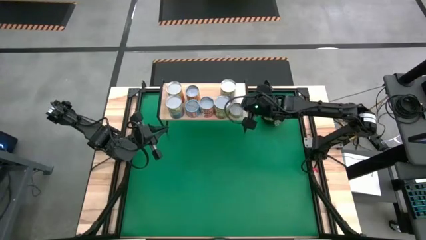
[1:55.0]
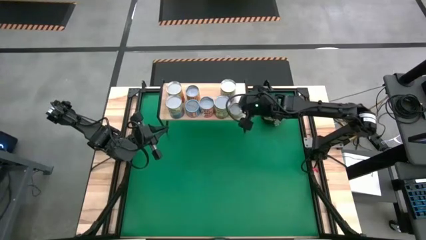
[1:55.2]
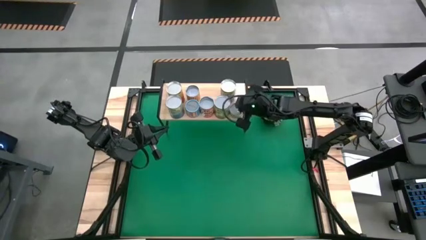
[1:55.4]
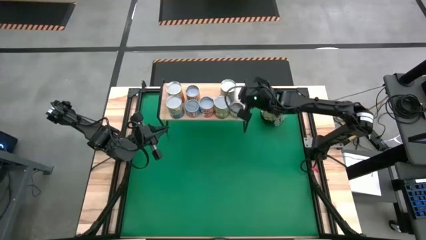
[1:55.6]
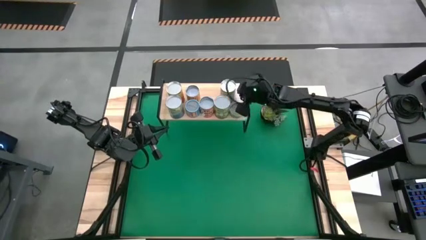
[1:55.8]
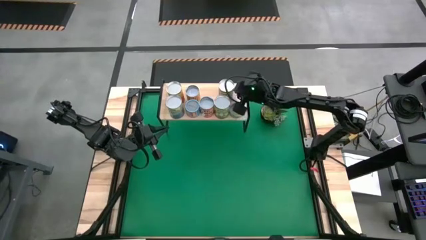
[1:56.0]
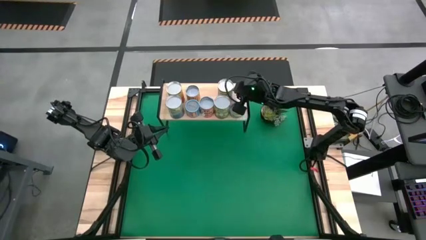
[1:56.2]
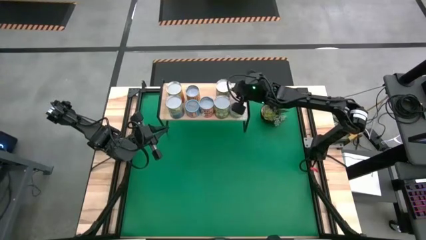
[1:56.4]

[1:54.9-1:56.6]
Task: Pick and place cans onto a shelf
Adjust the light blue can on the shelf

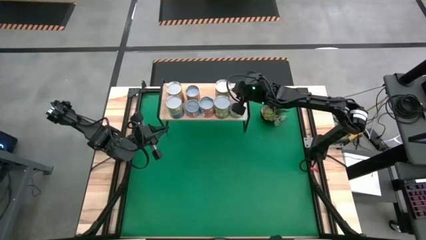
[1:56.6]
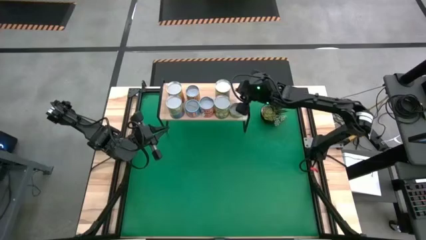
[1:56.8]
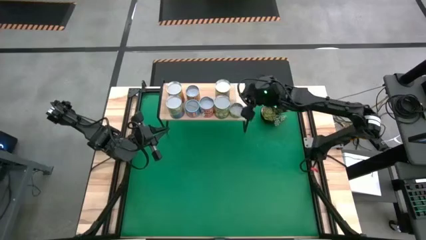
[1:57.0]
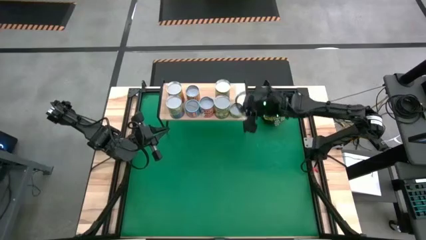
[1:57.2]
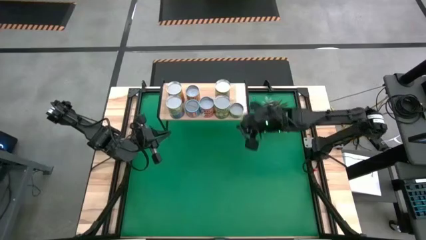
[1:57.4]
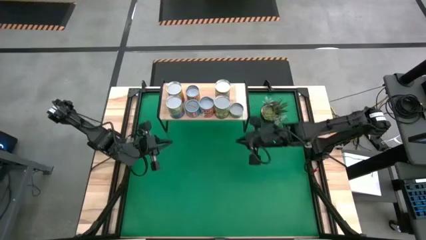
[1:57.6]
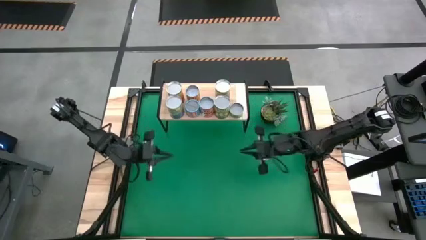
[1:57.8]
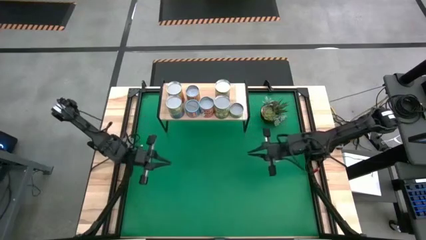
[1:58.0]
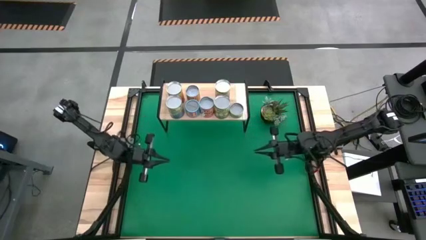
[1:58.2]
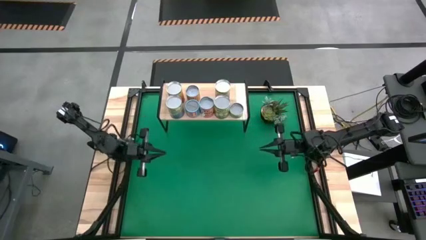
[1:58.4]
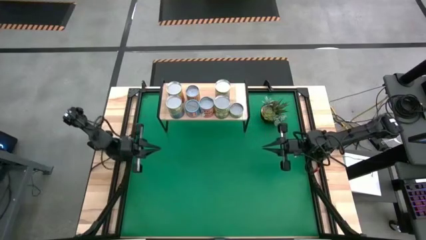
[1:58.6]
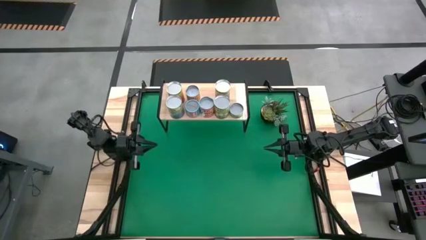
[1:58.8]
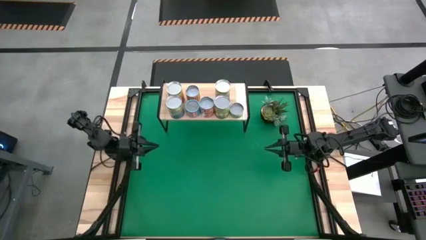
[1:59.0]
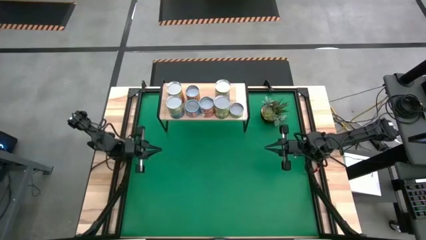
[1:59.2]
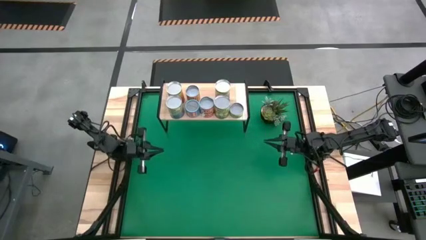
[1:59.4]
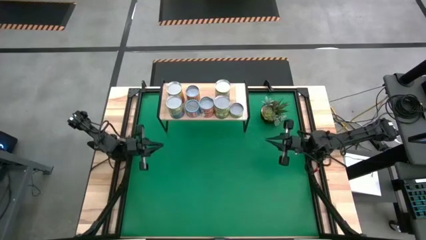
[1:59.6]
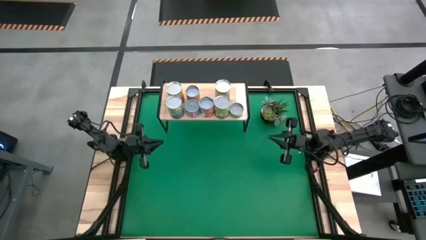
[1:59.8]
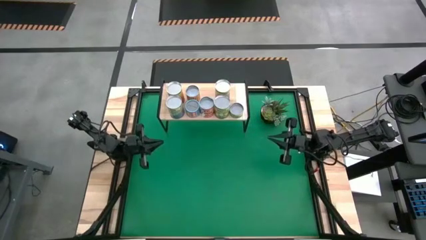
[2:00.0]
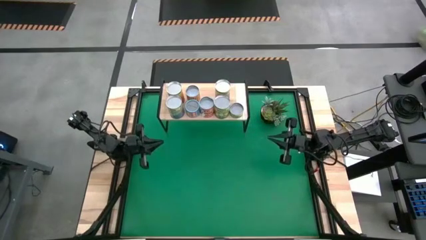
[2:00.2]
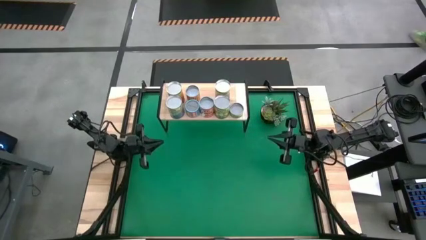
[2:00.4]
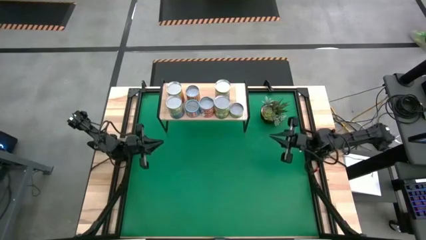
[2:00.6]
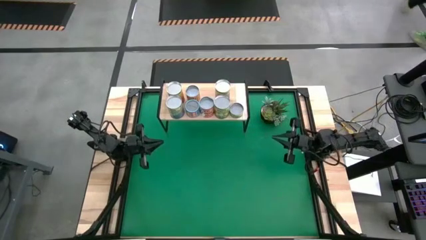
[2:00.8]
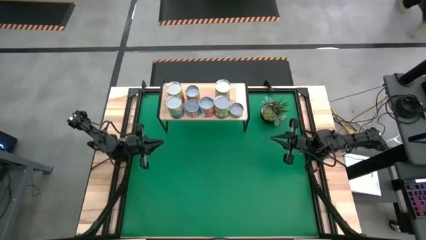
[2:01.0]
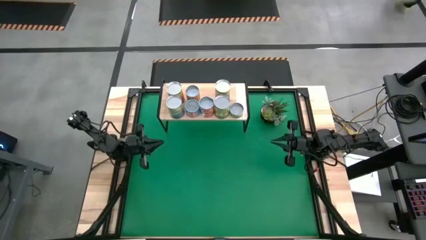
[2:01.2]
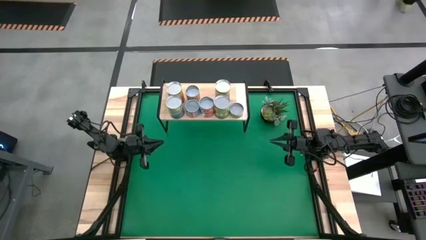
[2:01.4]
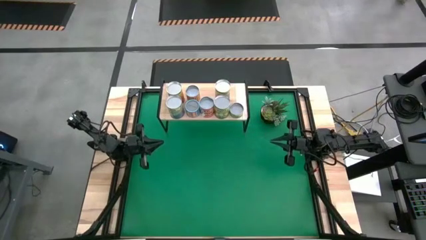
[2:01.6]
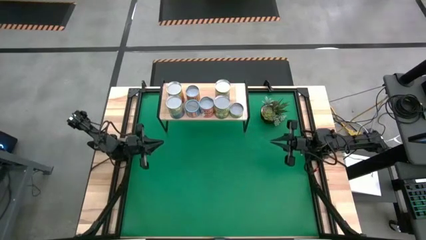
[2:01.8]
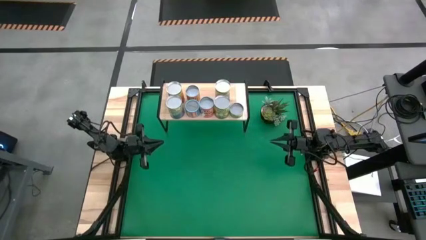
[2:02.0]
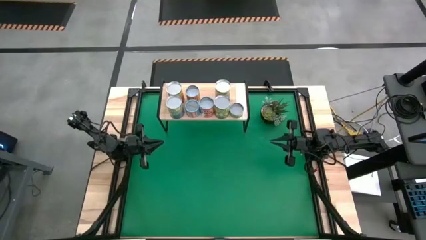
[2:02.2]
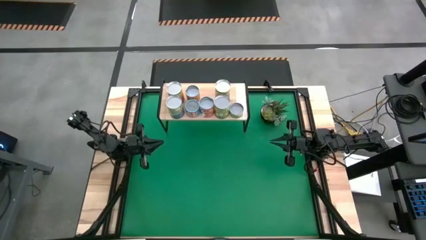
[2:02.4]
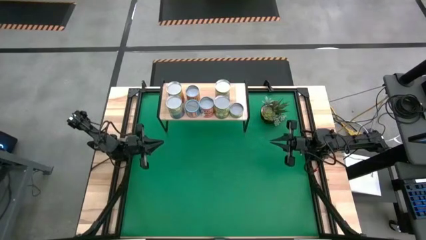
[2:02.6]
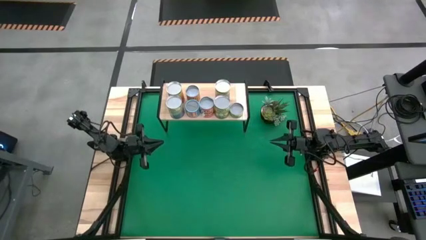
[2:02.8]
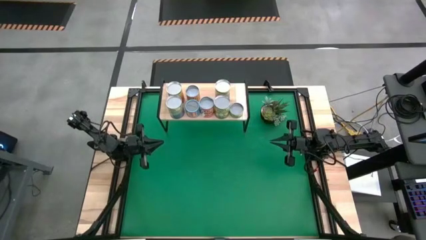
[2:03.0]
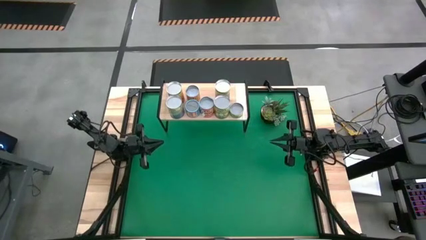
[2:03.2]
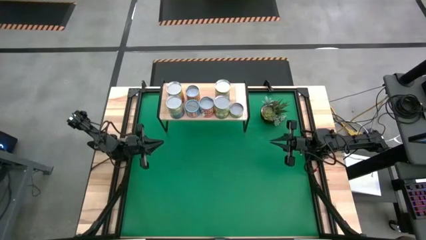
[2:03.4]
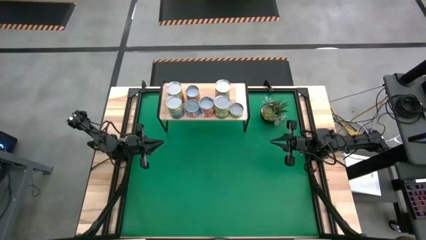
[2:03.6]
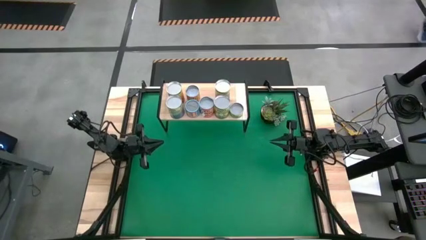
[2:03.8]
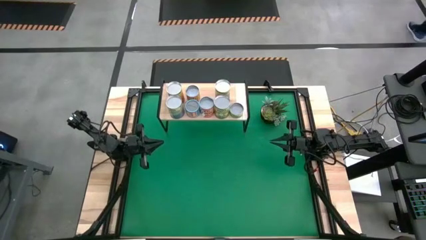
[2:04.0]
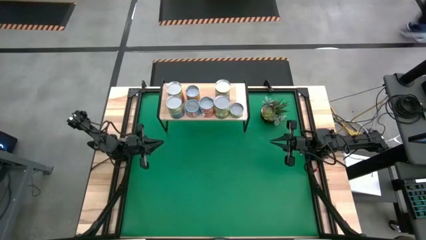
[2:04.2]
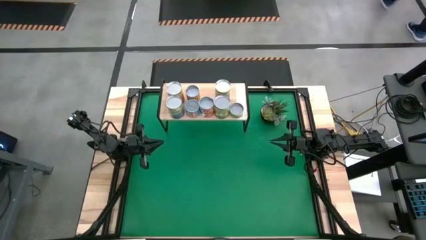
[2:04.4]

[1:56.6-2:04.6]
Return to Home Position

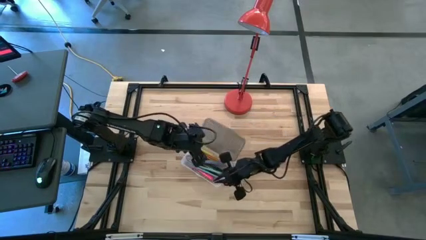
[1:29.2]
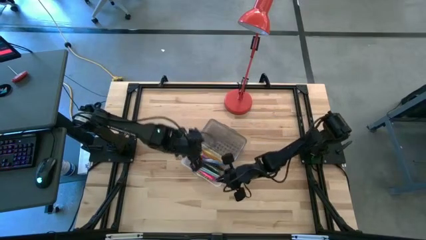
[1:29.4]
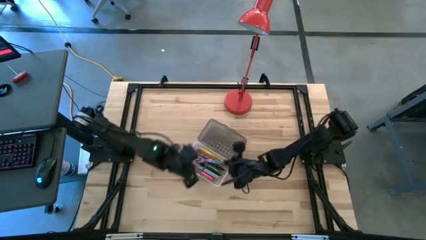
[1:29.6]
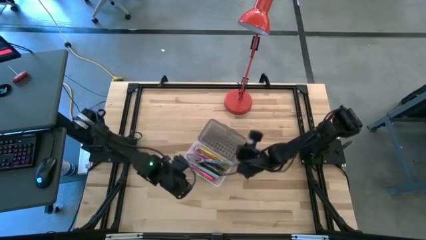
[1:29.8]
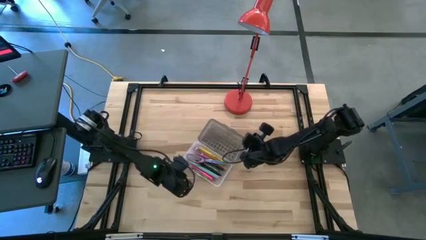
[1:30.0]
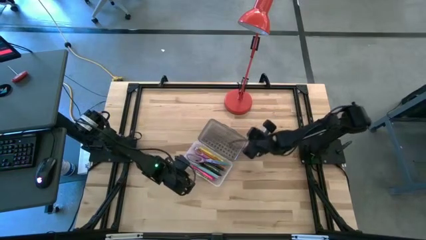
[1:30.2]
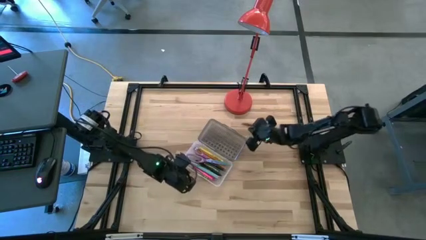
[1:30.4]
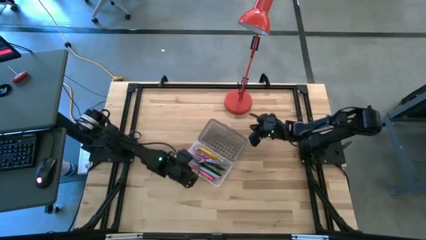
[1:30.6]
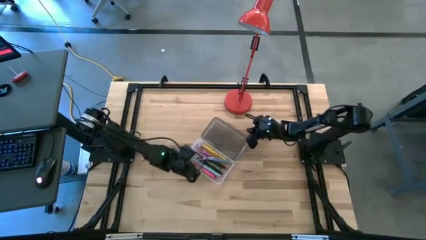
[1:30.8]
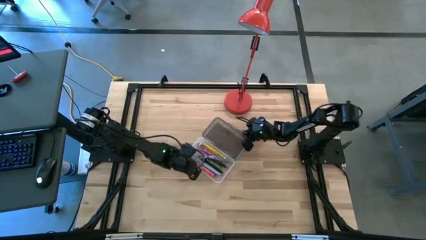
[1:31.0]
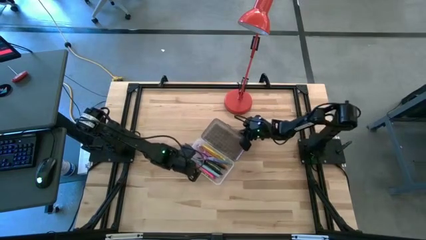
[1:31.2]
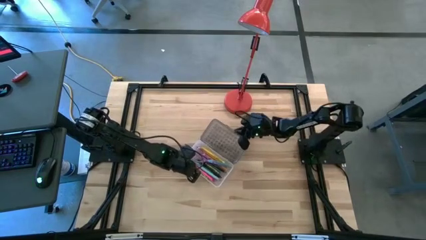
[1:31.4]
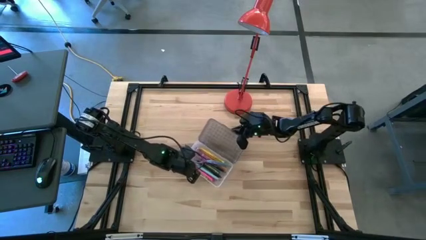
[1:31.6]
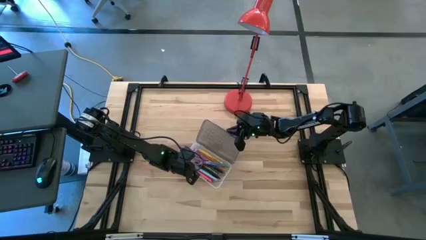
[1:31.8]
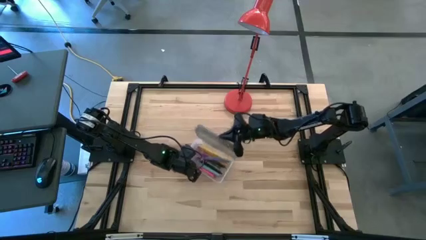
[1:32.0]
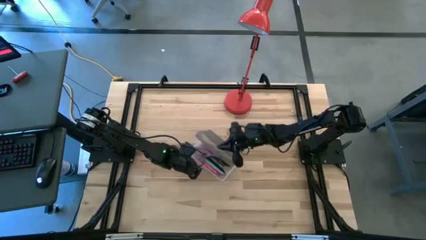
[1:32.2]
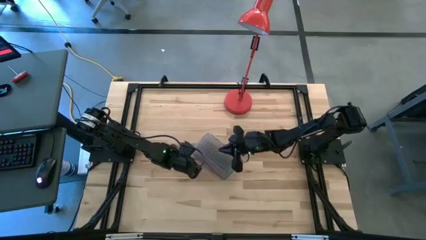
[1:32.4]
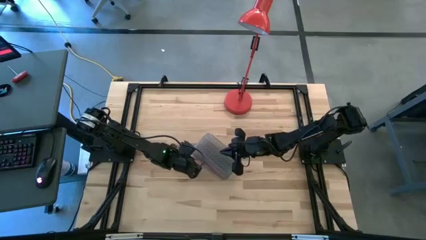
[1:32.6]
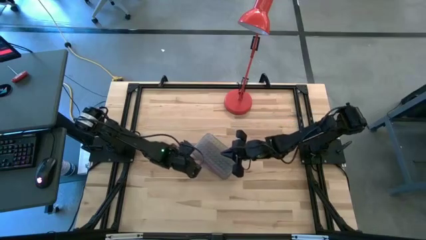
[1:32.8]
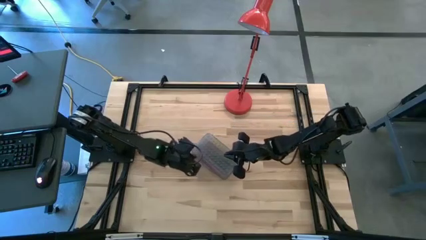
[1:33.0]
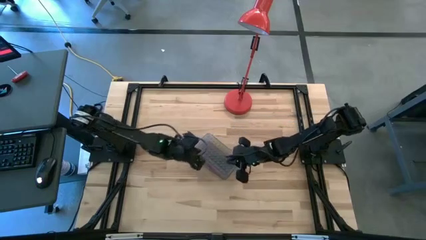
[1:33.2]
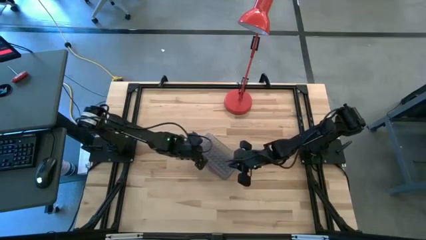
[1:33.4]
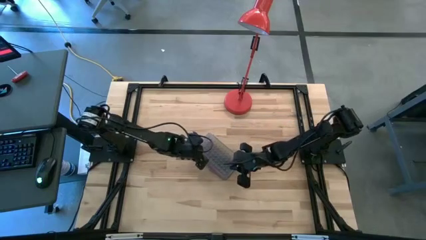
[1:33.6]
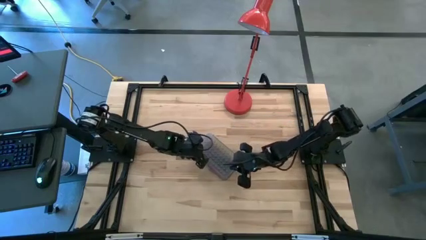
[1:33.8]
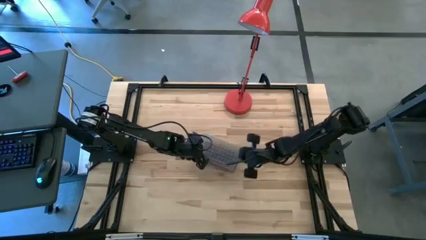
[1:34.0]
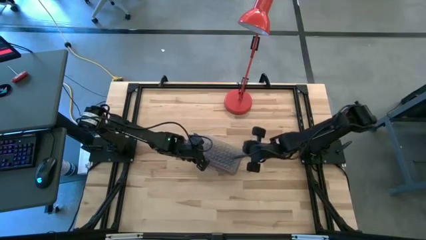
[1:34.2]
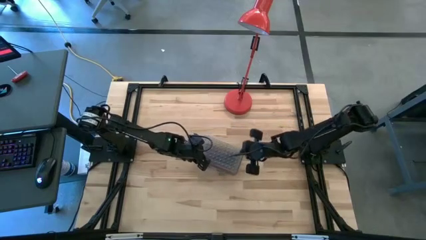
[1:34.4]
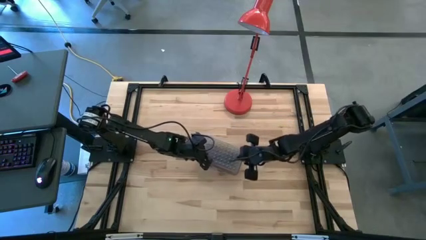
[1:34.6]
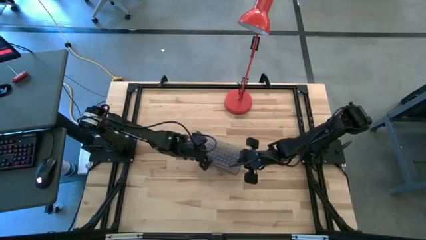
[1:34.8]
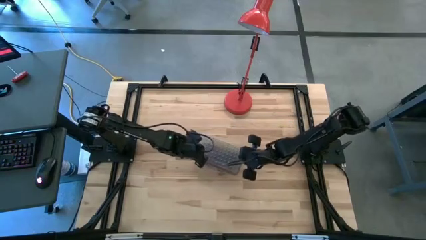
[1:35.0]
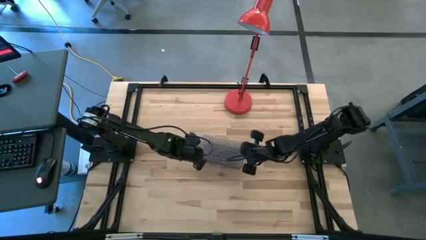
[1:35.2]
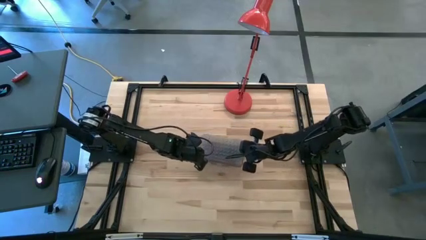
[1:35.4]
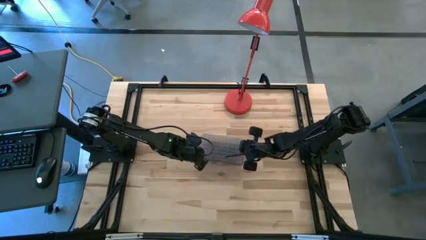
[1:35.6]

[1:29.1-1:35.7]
Task: Pick & place school supplies into a supply box
Close the black supply box
